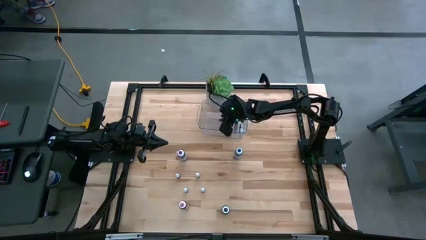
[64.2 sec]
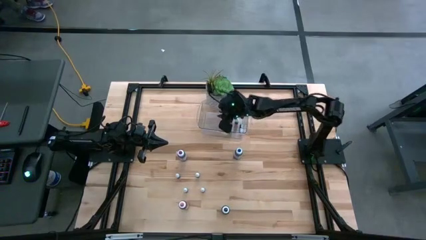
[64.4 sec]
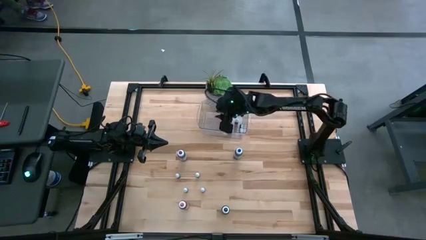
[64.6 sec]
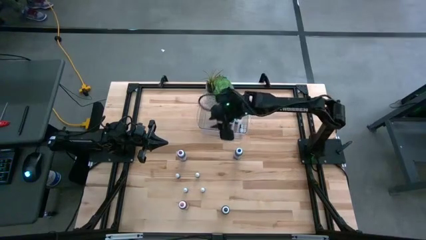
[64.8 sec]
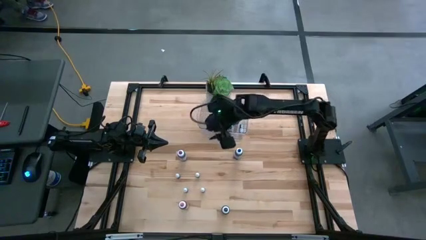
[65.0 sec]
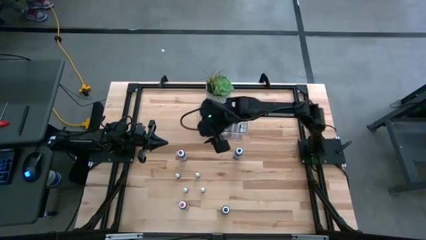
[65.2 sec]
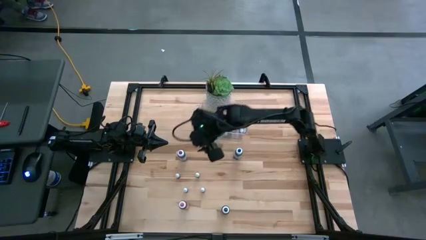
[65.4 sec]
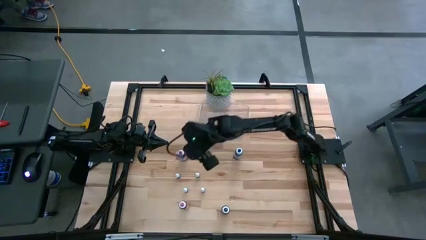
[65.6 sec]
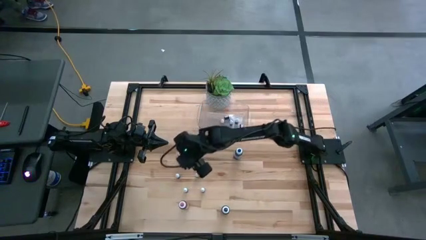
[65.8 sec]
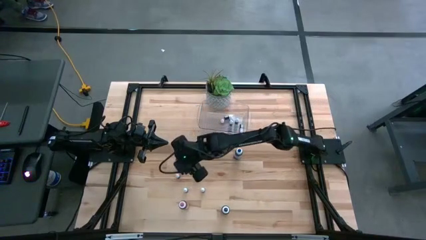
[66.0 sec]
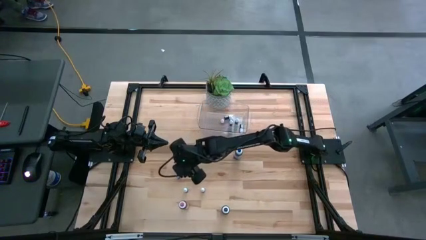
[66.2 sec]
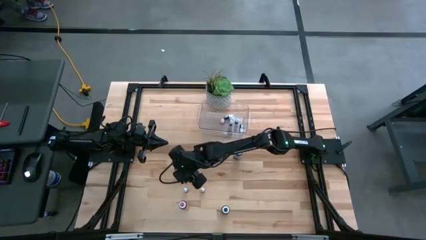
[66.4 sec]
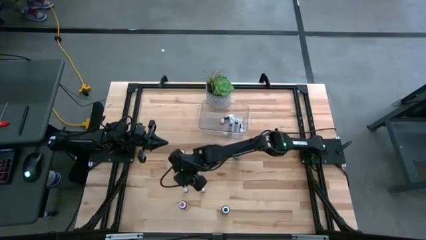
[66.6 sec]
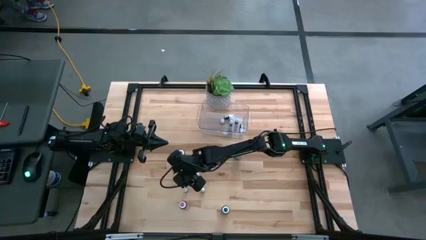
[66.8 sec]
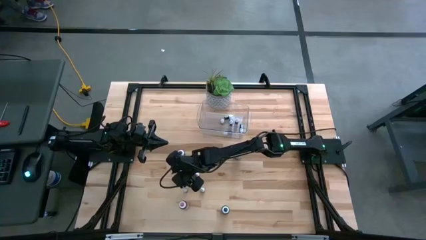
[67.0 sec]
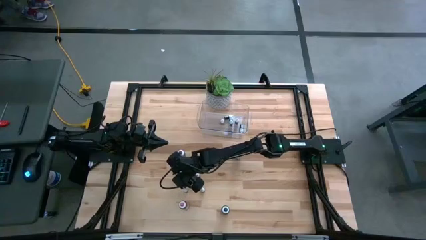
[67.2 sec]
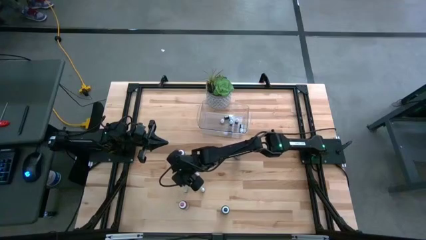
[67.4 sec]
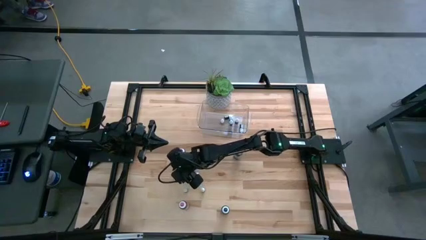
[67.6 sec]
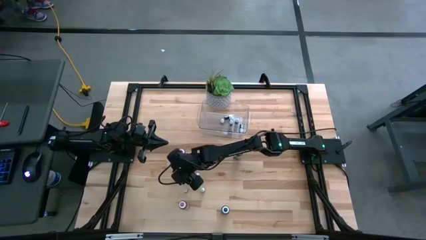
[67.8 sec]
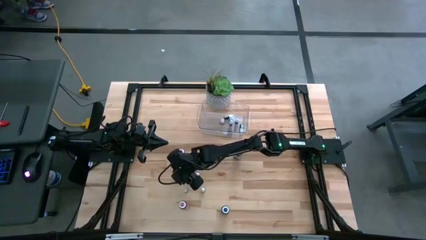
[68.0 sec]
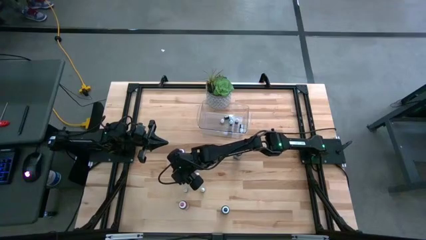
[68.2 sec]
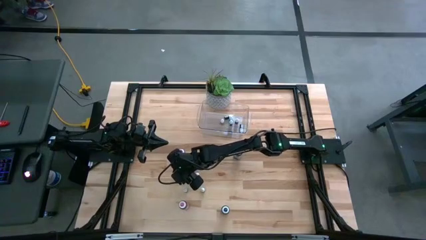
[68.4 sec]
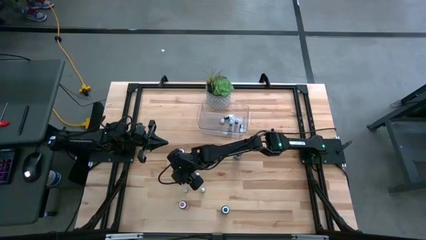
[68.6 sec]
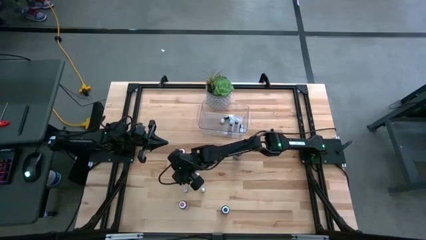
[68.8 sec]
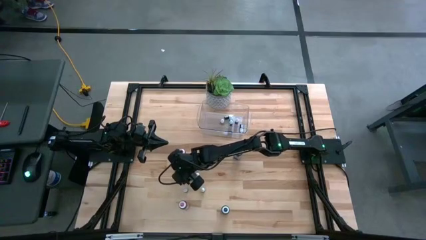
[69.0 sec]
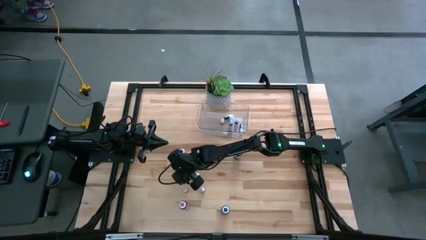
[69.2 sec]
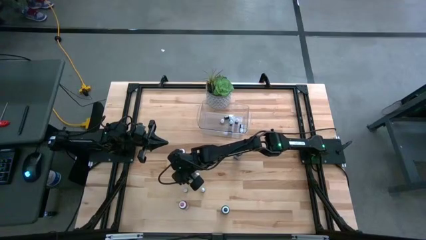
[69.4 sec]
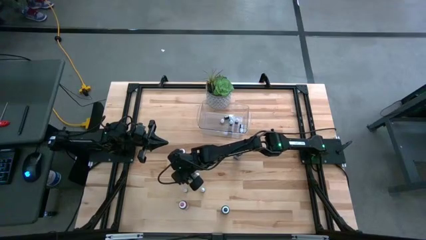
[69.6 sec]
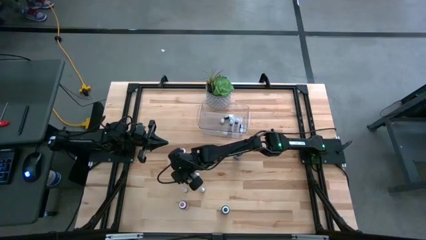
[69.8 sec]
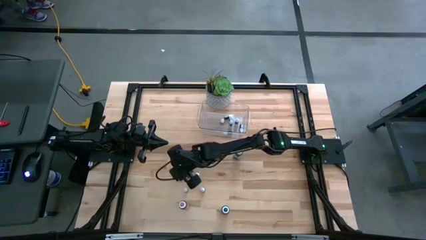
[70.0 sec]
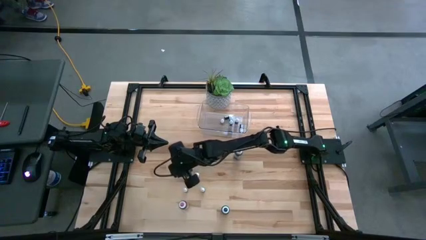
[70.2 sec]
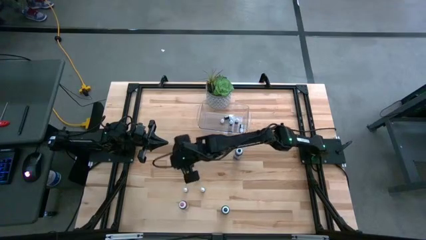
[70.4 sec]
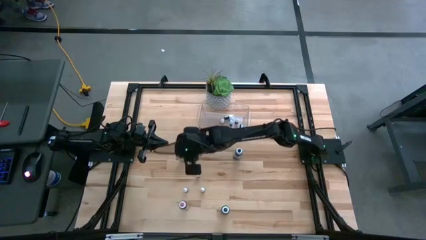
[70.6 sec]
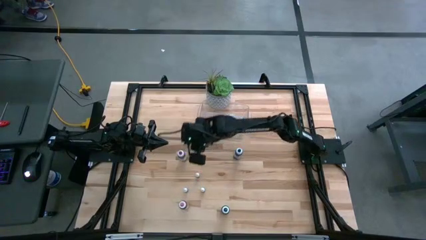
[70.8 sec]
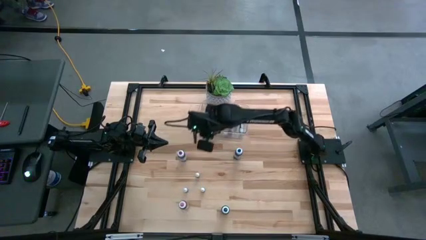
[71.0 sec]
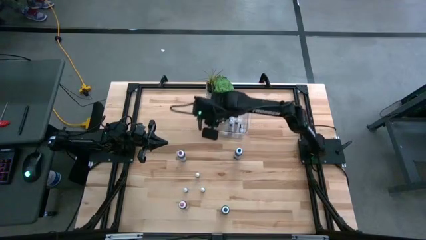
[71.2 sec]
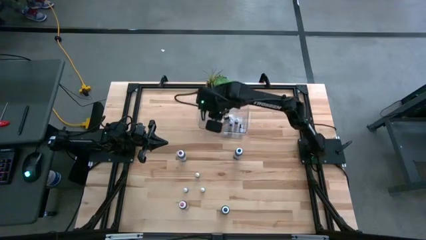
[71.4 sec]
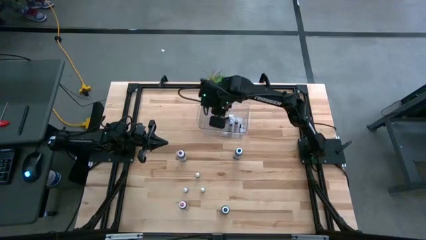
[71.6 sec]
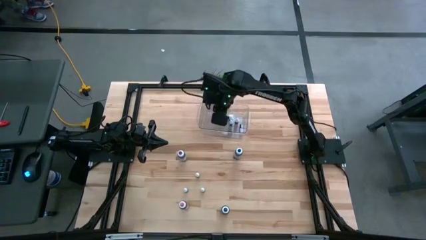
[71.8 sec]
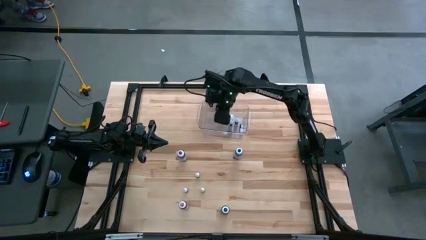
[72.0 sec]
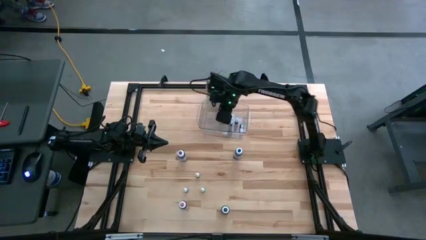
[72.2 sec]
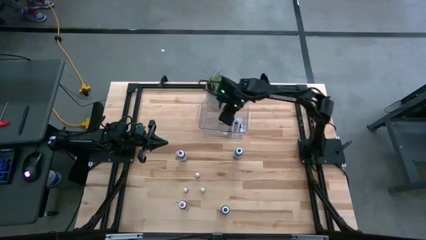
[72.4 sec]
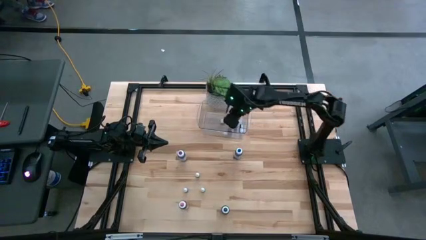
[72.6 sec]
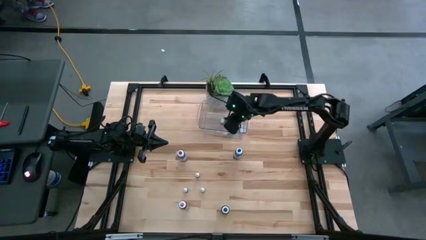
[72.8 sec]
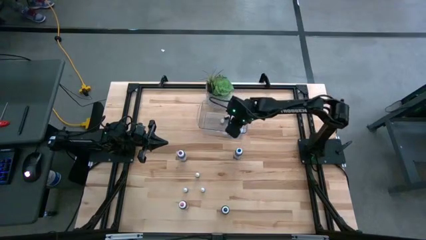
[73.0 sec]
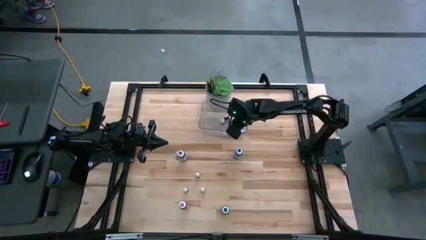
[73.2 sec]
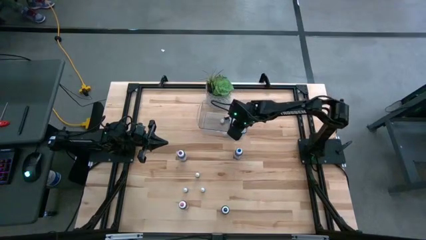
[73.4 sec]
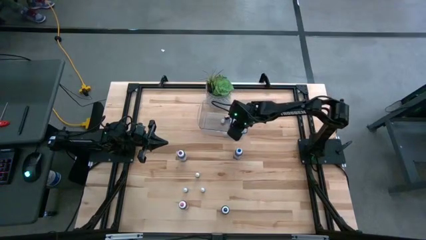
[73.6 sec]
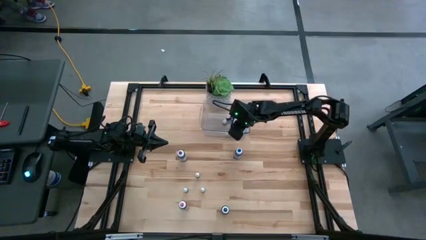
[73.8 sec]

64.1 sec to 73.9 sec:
Task: Pick & Place food coloring
Put the small black food coloring bottle into the bin

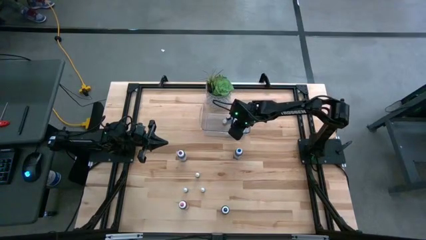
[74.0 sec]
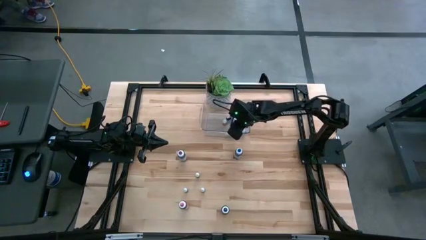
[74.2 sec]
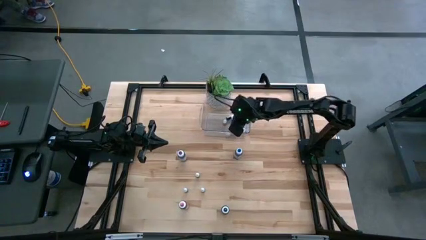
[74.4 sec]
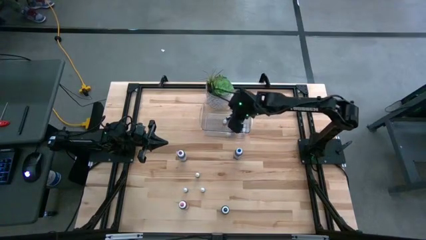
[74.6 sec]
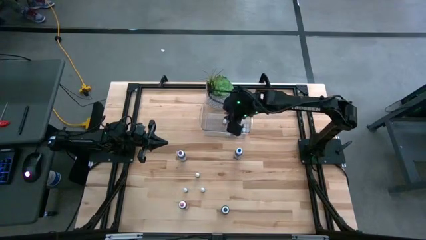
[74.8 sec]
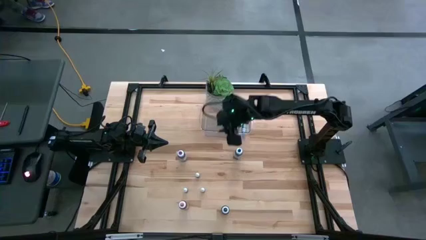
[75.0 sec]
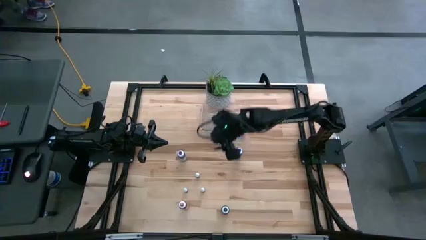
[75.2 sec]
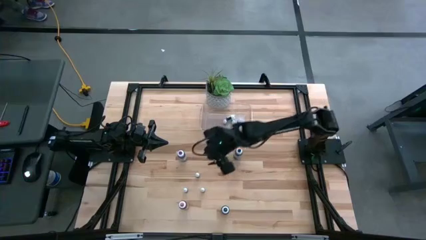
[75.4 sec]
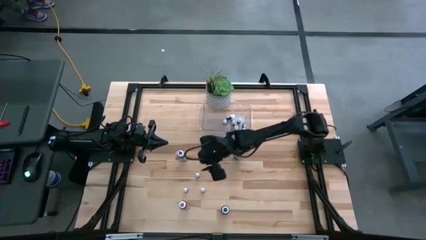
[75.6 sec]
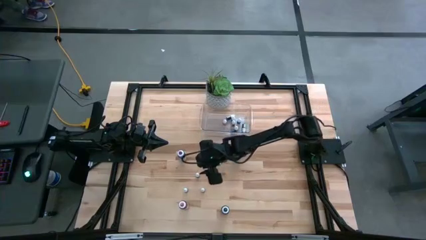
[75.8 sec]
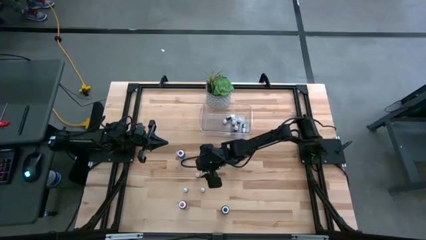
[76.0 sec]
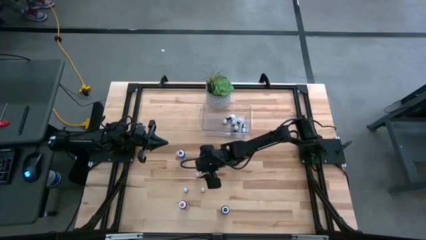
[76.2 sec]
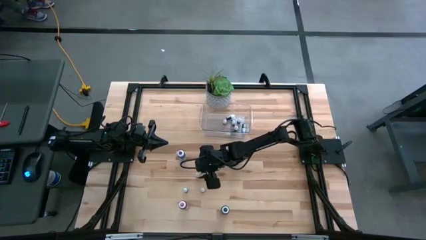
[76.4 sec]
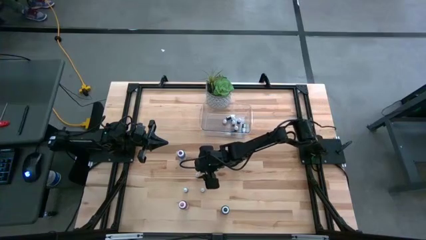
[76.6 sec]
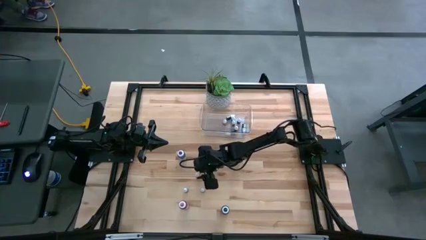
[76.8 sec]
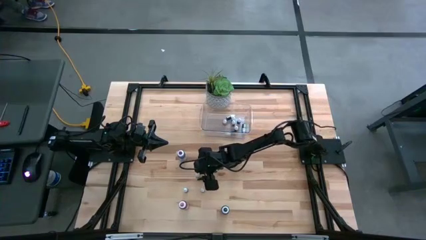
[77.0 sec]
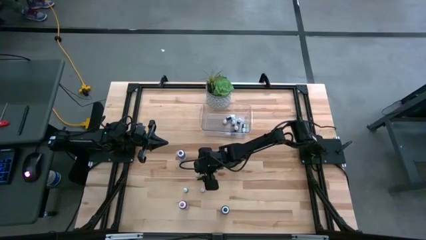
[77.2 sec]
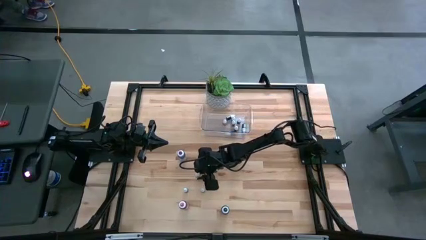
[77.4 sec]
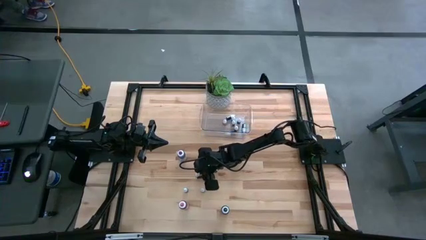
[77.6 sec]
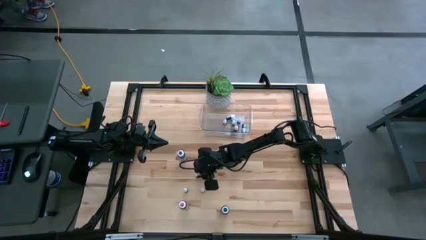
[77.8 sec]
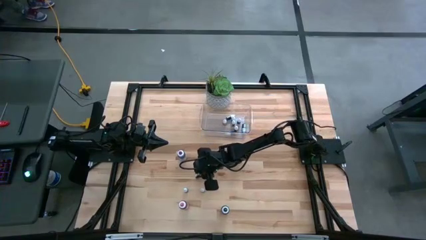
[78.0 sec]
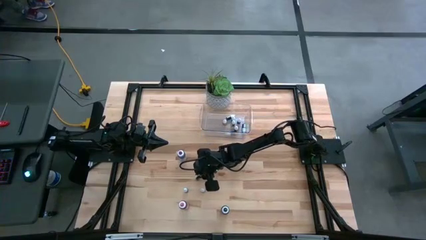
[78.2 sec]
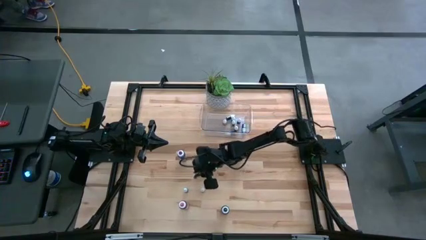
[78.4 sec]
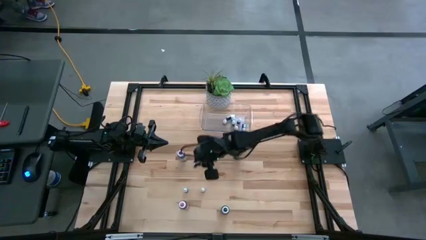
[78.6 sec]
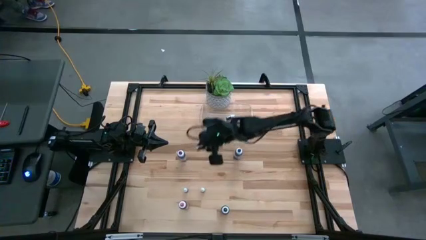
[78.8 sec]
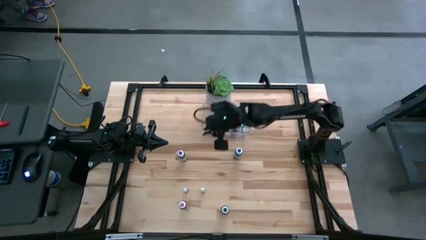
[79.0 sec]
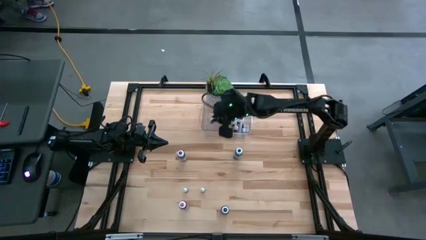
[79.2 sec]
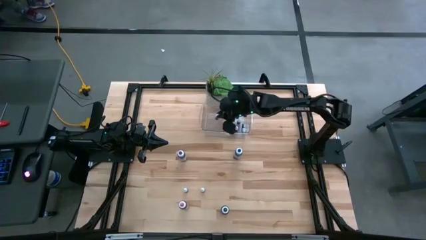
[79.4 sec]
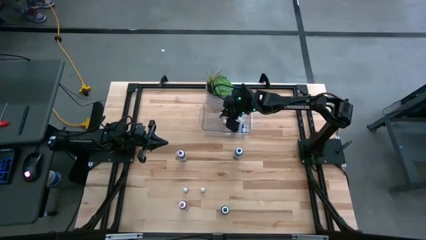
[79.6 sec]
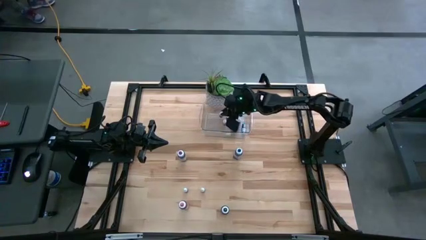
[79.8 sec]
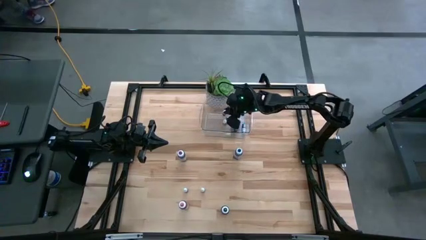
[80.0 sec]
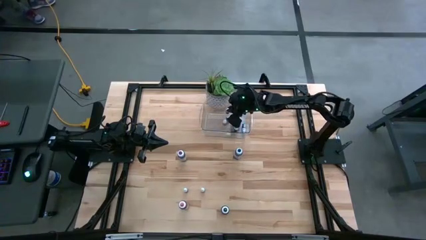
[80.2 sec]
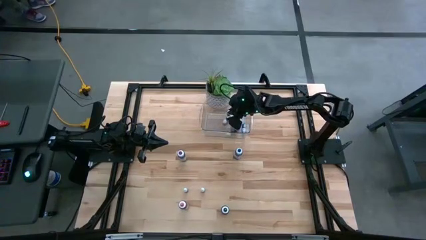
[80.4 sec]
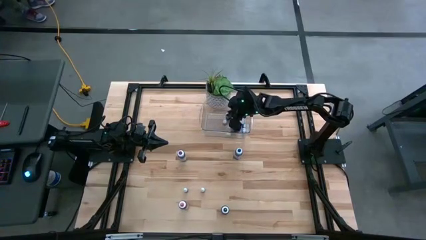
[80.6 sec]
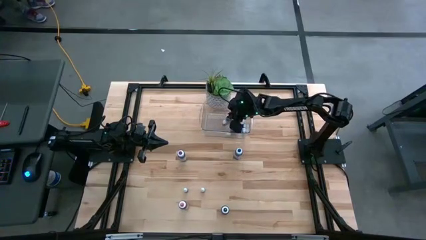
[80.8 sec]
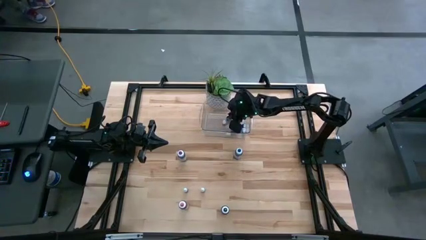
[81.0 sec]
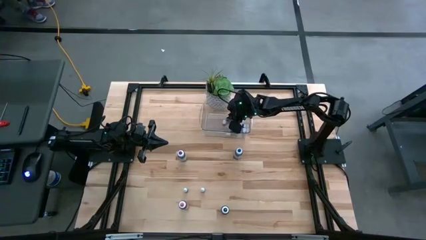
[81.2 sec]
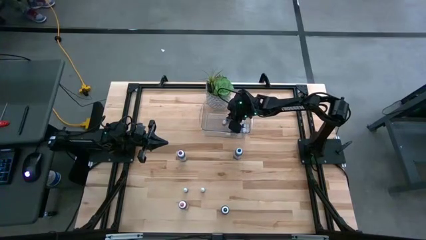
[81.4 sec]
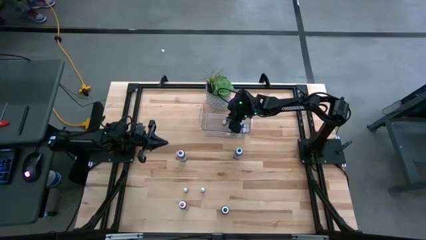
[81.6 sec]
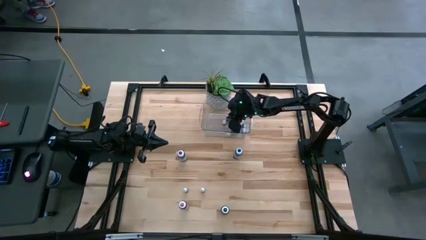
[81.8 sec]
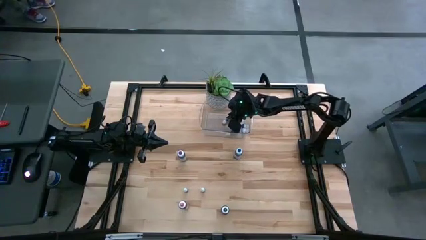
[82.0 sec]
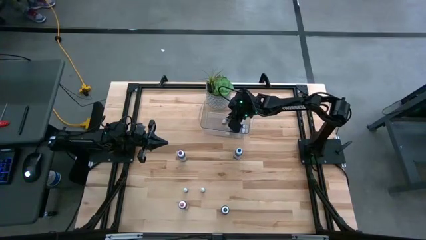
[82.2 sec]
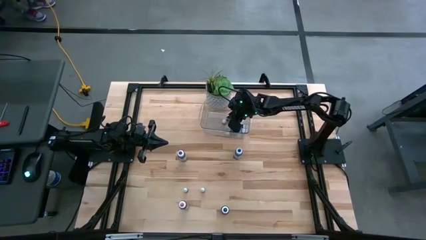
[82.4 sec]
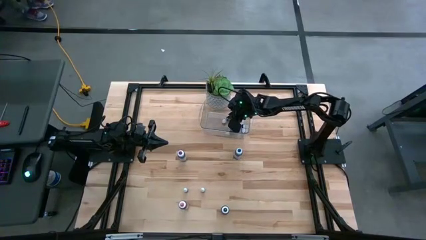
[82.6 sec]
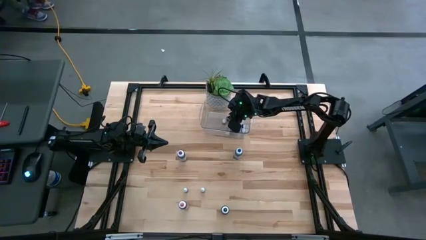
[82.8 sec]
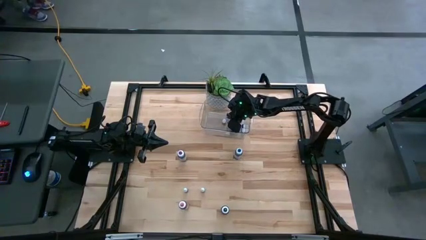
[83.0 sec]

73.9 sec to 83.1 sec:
Put the small black food coloring bottle into the bin
